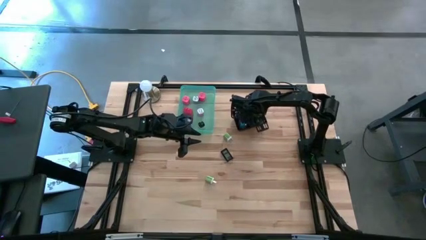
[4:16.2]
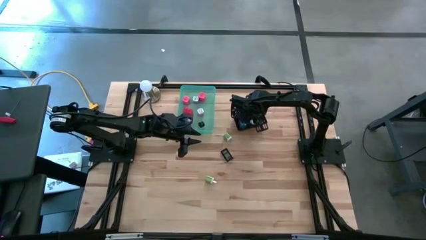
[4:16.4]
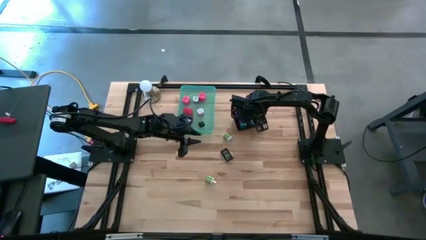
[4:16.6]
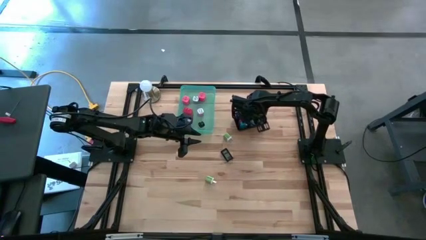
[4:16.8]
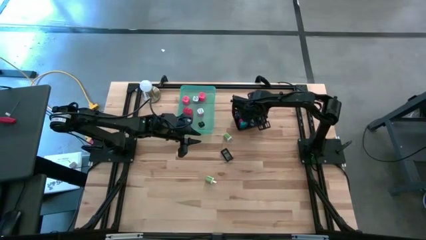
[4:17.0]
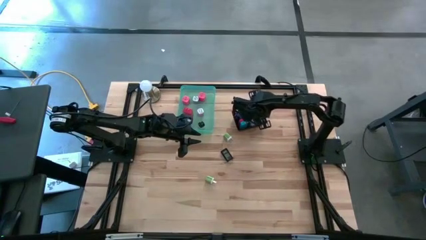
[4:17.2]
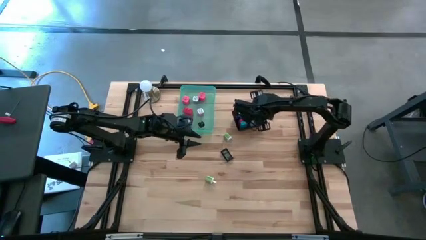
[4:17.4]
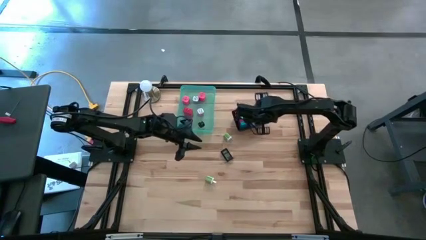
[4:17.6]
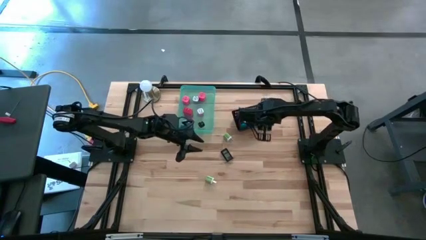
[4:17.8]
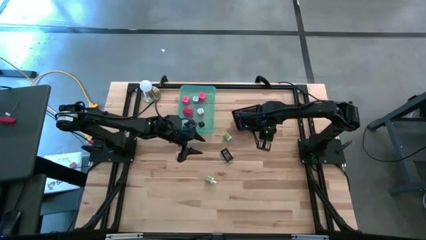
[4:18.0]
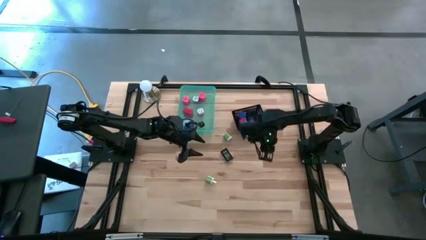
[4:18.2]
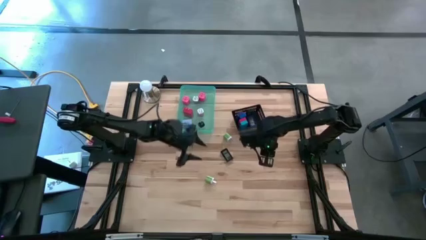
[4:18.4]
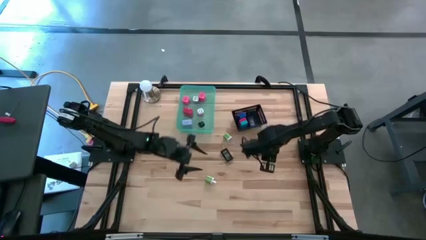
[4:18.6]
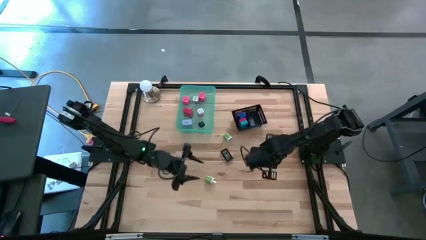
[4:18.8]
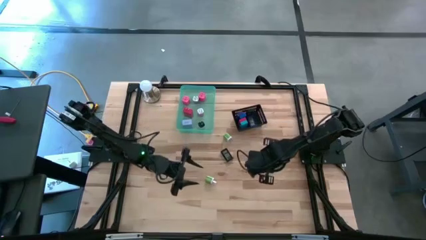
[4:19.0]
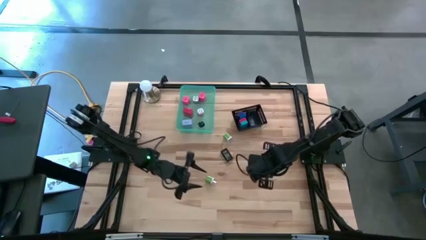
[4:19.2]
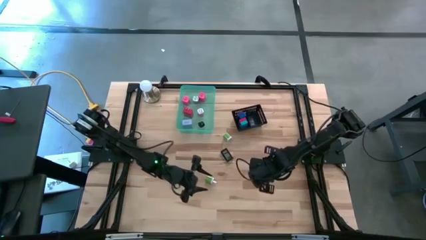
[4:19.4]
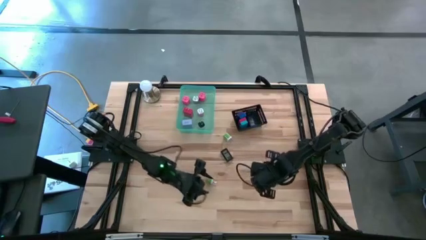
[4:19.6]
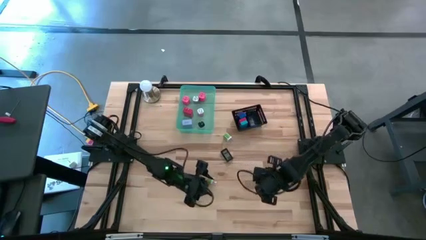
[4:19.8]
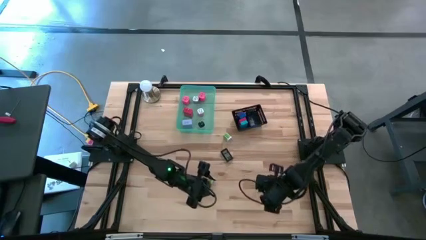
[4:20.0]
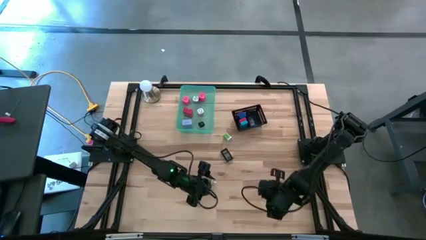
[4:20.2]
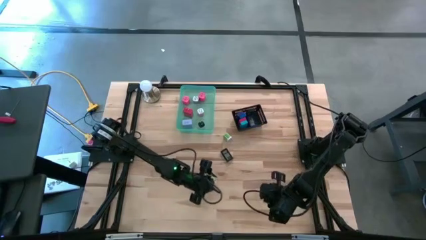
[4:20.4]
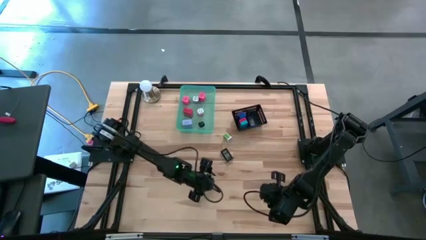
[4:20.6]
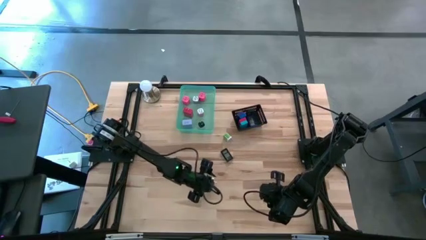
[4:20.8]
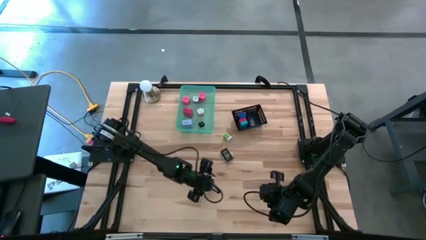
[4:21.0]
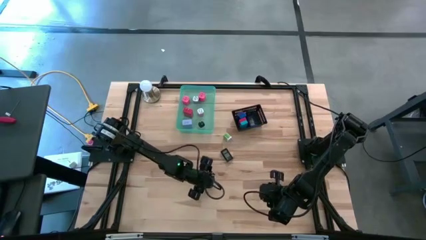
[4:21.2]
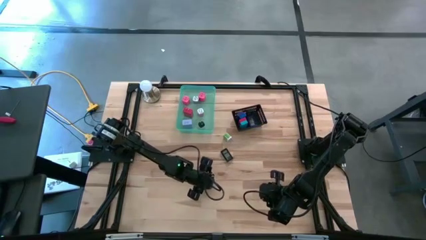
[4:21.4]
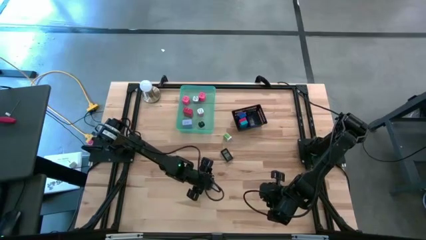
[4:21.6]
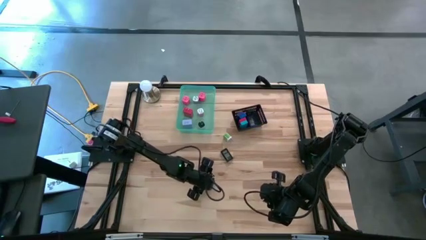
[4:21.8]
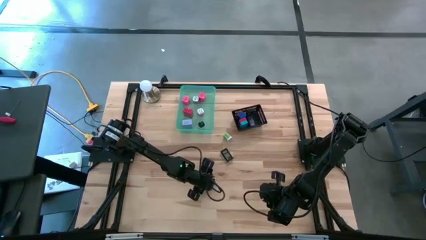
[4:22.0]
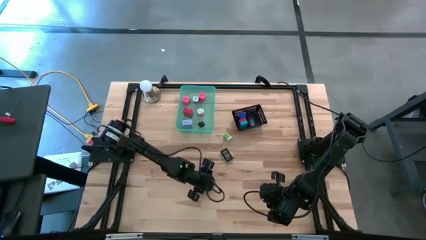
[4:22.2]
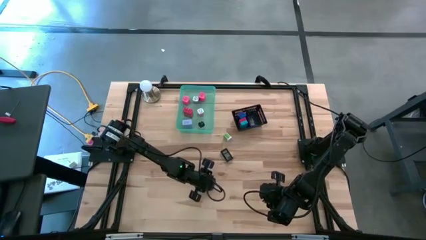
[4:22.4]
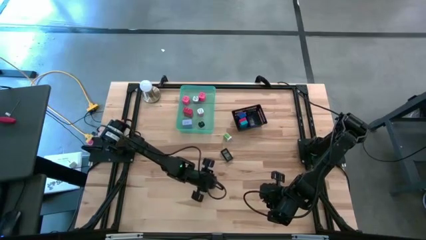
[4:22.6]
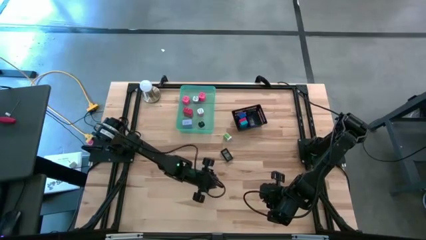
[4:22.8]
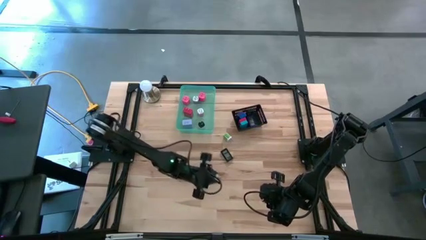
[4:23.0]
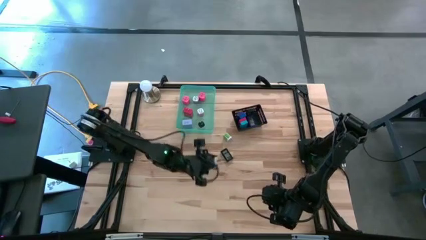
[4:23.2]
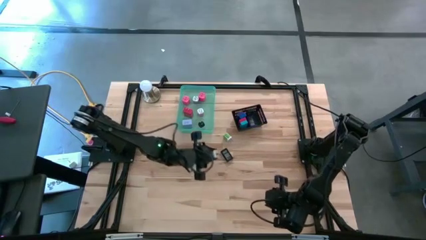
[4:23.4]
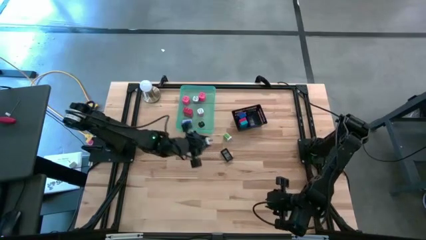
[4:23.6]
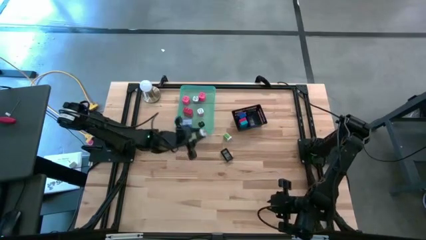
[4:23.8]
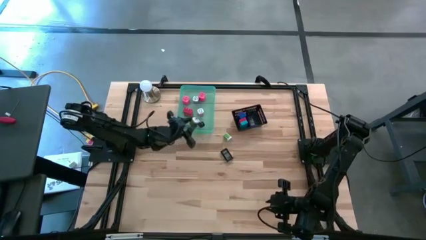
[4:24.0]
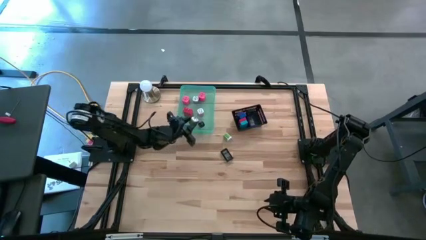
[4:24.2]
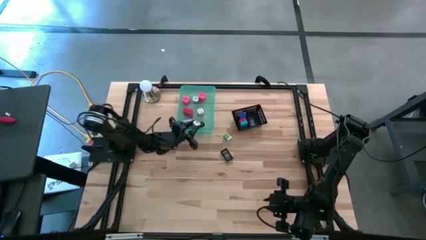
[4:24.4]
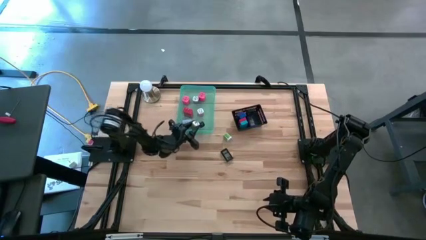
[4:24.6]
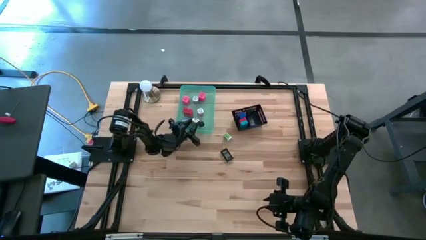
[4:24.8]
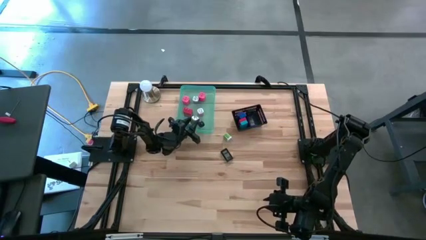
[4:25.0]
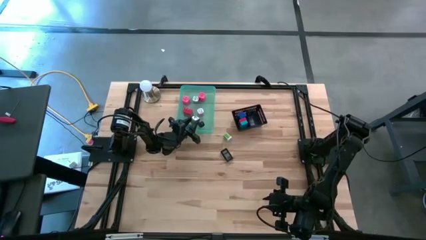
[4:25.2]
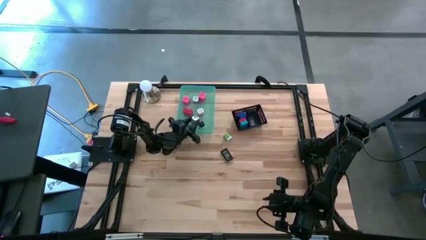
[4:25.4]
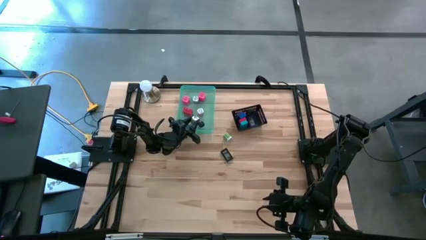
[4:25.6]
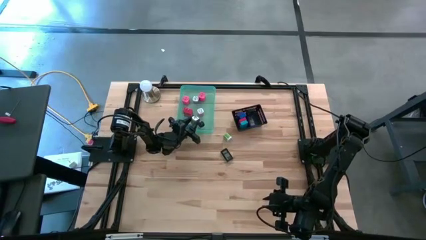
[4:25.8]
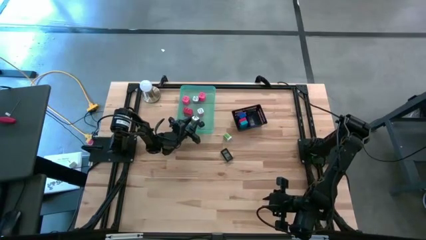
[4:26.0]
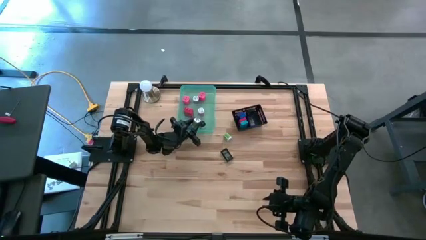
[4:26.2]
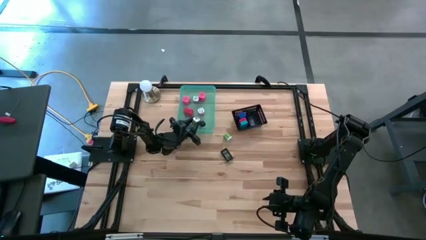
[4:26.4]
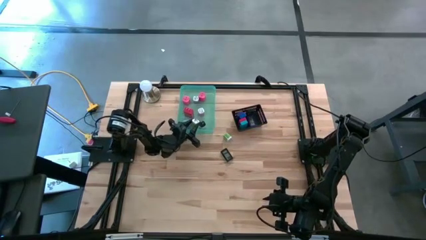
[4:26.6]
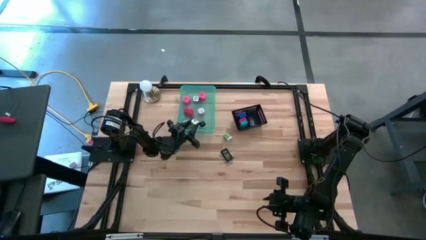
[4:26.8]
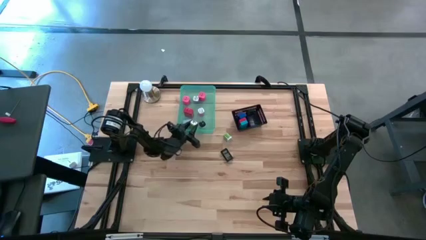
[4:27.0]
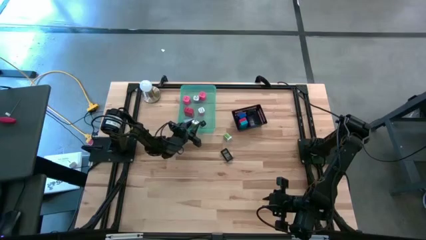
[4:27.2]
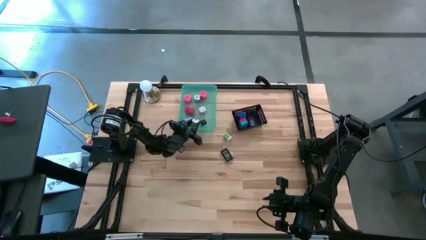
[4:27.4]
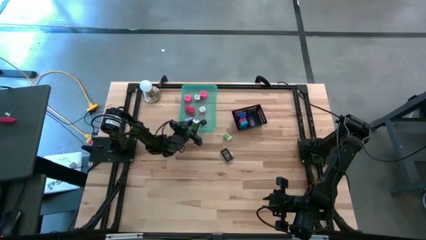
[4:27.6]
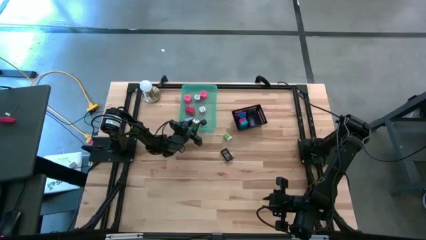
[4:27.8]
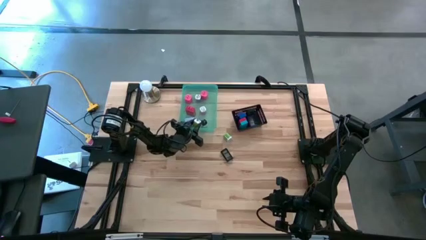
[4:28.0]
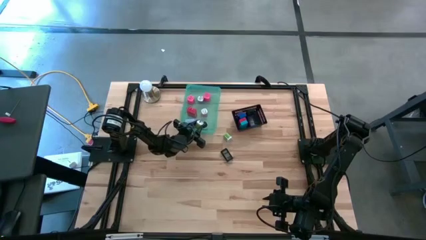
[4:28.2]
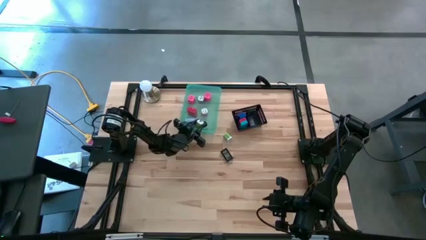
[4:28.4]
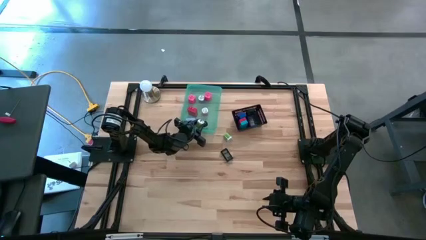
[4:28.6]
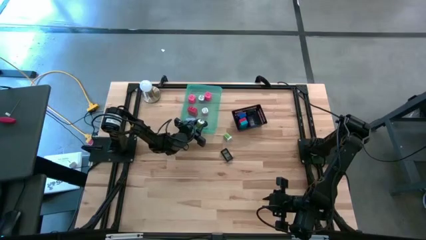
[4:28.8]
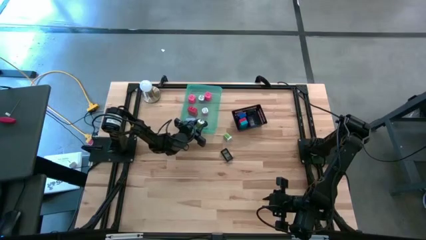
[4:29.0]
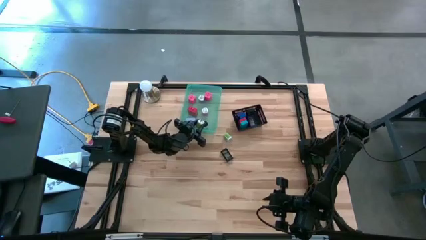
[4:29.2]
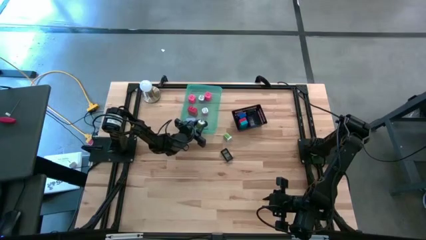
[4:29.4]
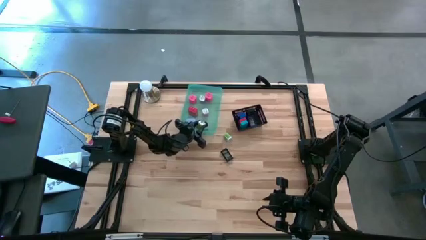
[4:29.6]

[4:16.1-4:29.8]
Task: Pick & Place Office items
Put the bottom green charger adapter into the green bin

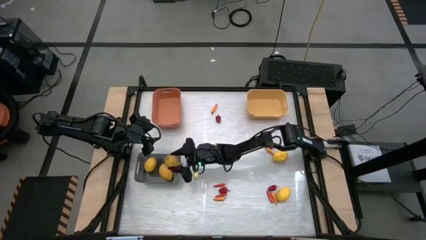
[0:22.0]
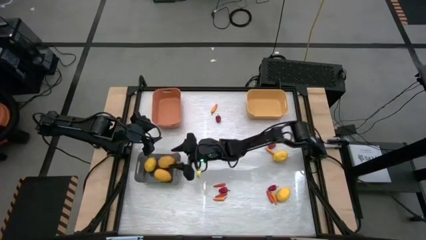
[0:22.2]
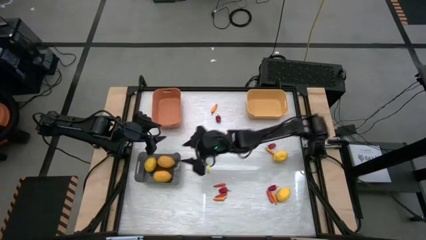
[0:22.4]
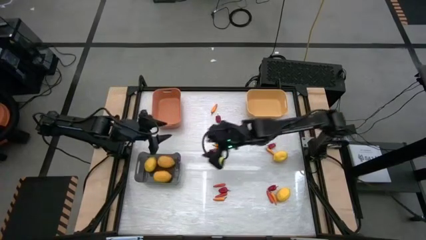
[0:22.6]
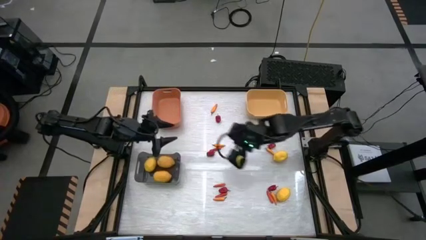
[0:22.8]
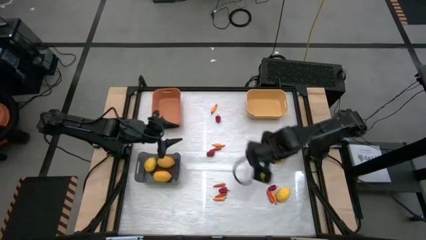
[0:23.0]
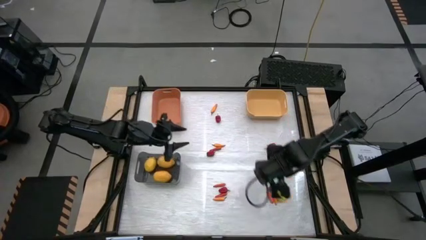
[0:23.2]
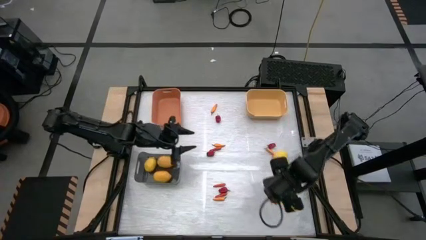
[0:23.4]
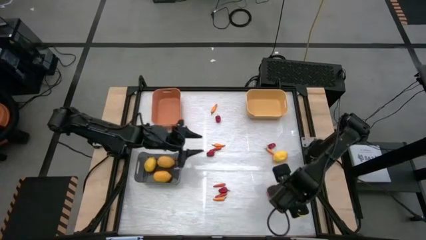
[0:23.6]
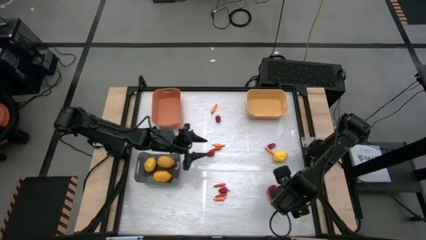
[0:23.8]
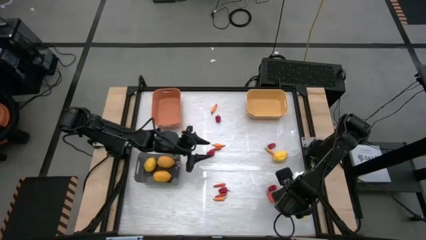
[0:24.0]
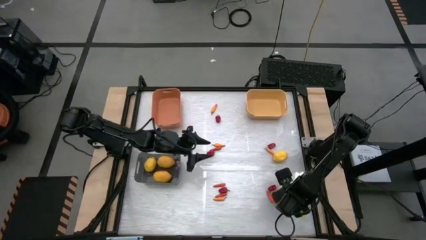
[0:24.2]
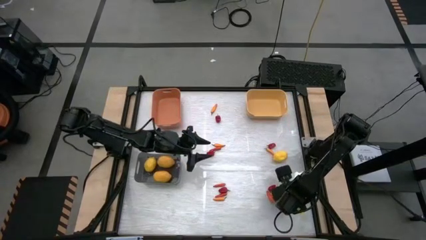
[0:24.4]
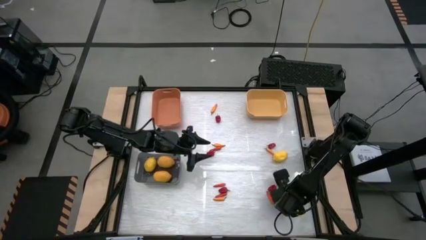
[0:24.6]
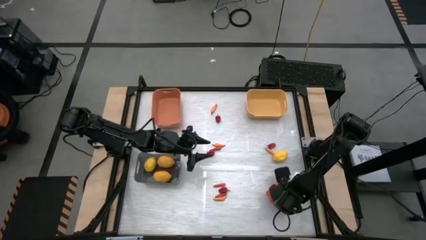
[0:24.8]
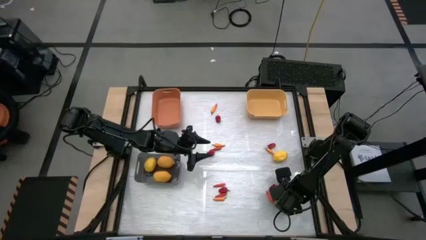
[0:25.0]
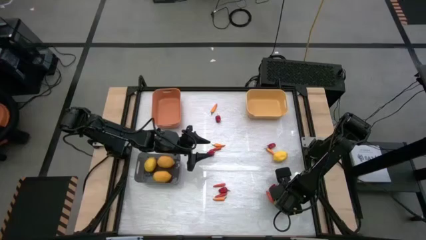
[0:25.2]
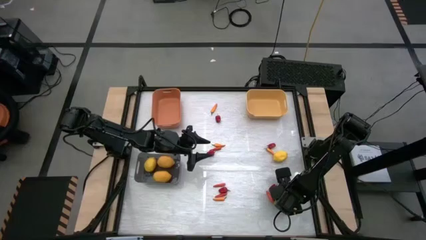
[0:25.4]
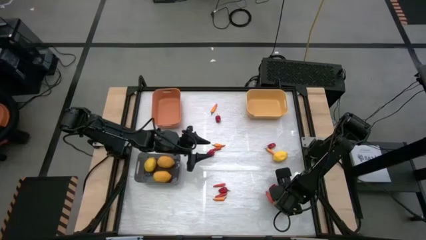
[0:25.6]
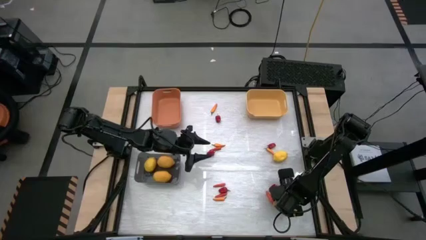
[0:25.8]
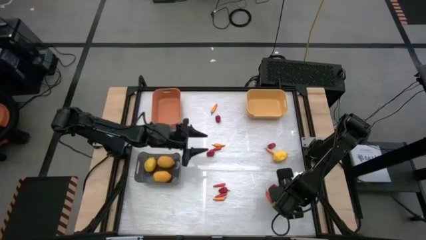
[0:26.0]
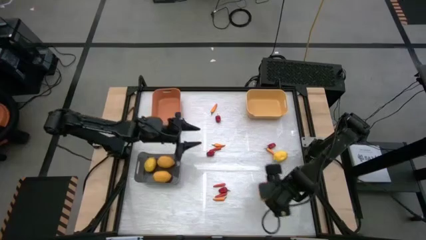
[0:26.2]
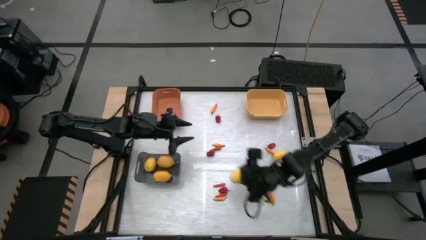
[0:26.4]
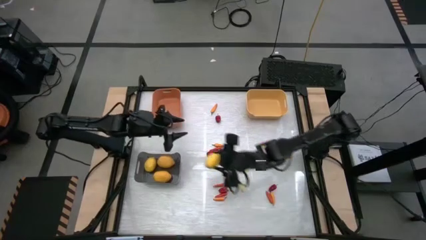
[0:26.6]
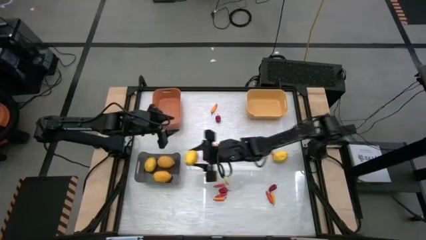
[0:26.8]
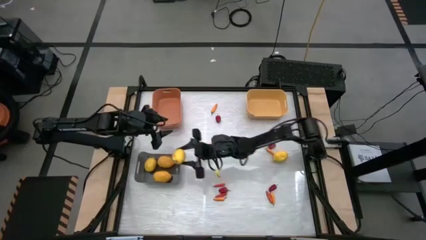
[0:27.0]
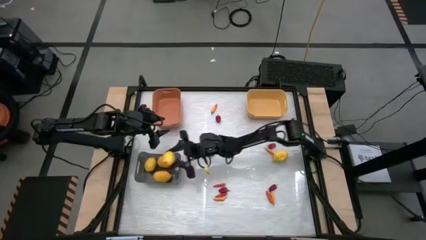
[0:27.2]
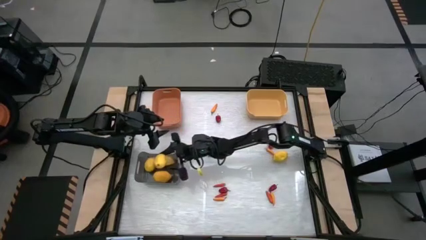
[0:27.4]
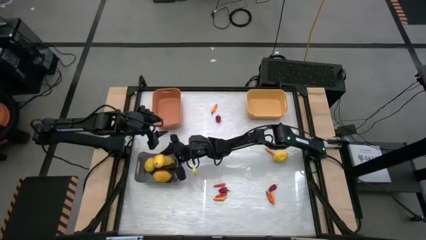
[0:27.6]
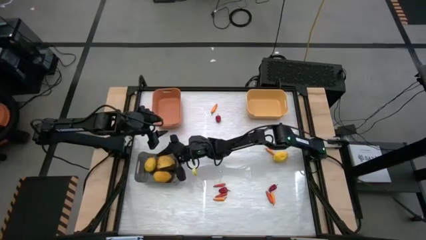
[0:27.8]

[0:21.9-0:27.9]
Task: Sort produce into baskets
Put the yellow lemon into the black bin
